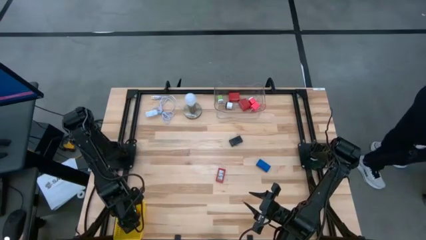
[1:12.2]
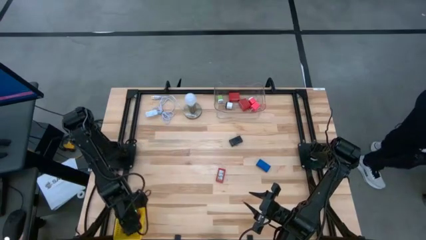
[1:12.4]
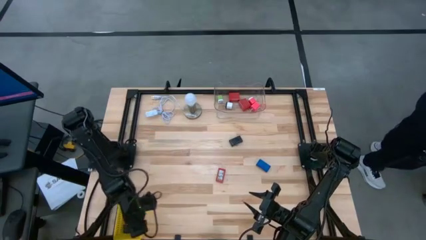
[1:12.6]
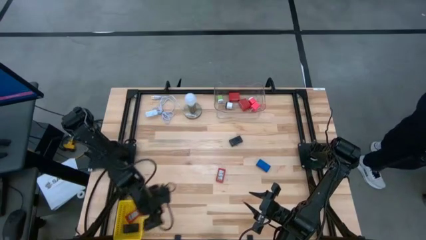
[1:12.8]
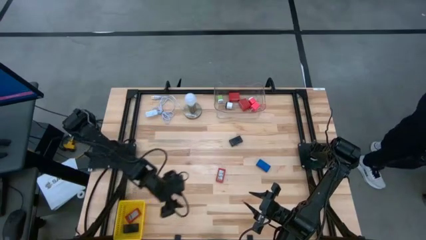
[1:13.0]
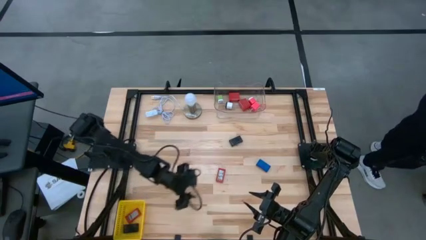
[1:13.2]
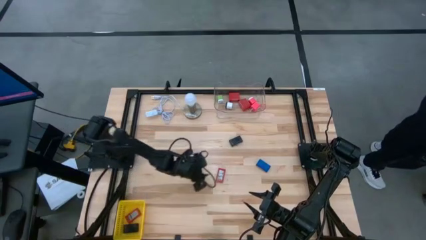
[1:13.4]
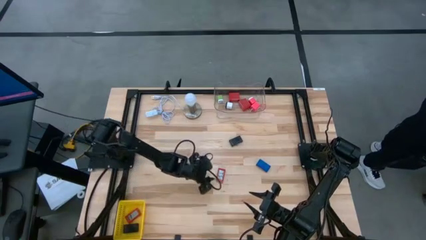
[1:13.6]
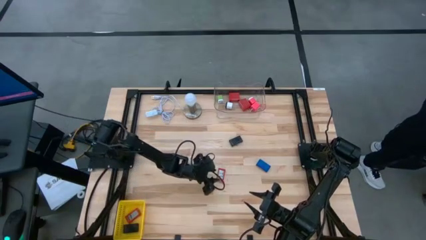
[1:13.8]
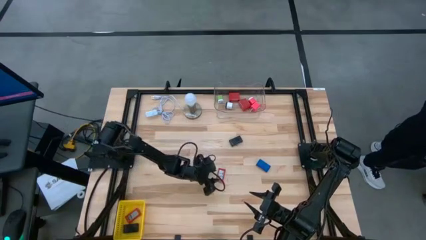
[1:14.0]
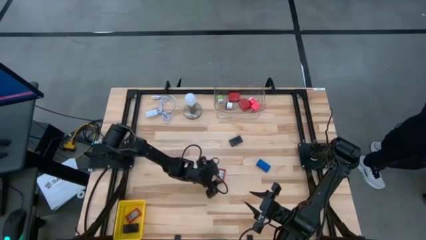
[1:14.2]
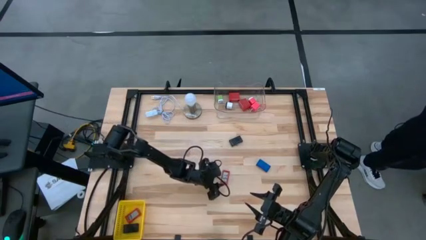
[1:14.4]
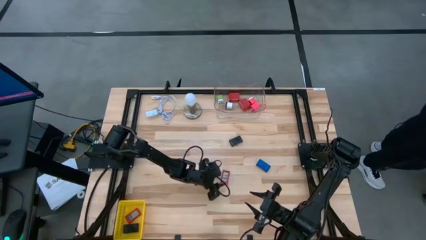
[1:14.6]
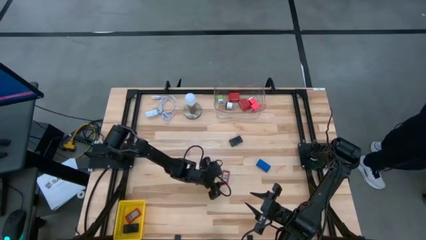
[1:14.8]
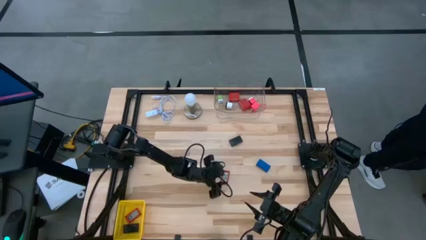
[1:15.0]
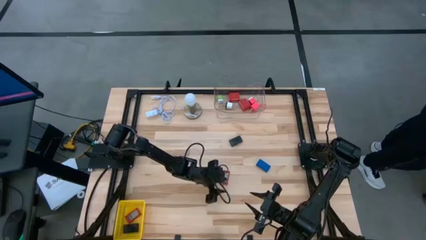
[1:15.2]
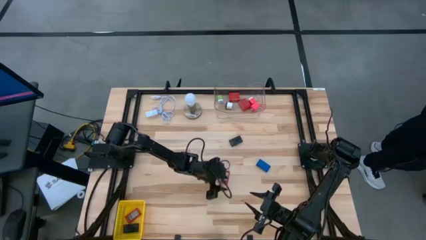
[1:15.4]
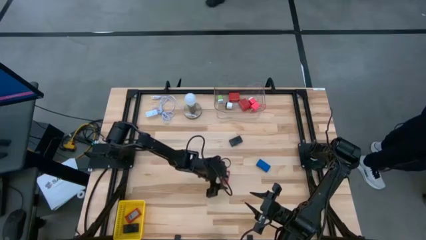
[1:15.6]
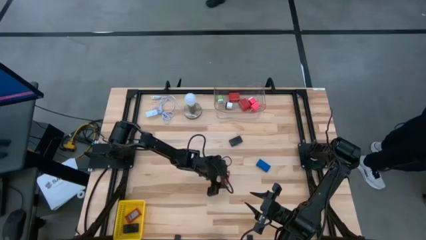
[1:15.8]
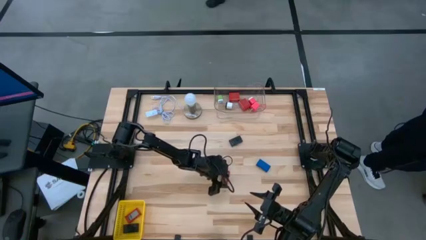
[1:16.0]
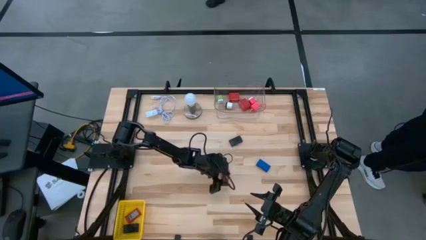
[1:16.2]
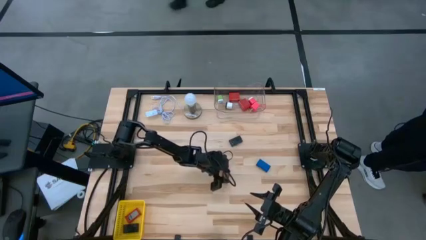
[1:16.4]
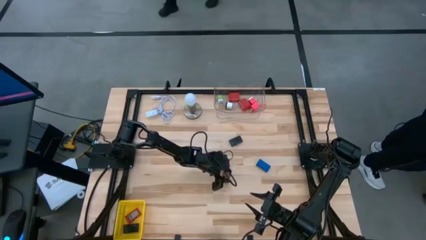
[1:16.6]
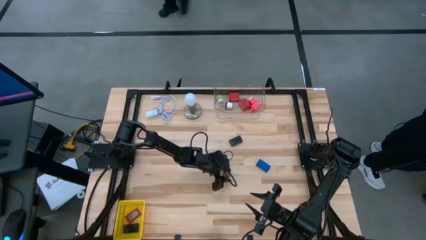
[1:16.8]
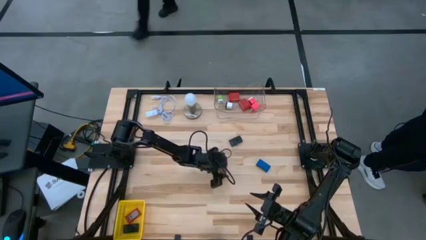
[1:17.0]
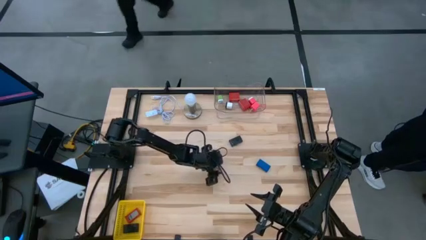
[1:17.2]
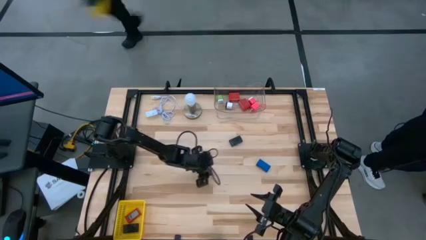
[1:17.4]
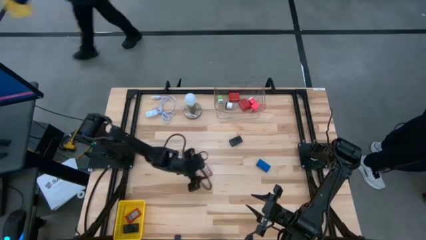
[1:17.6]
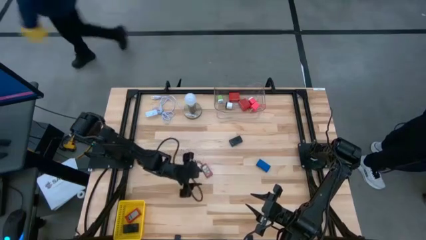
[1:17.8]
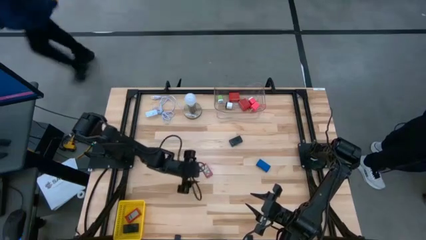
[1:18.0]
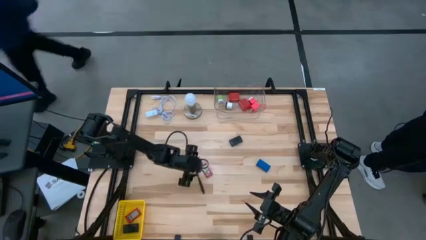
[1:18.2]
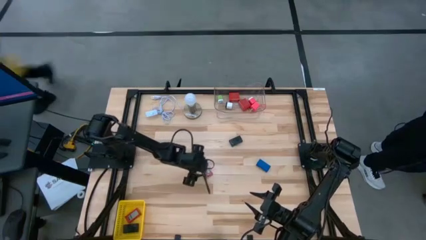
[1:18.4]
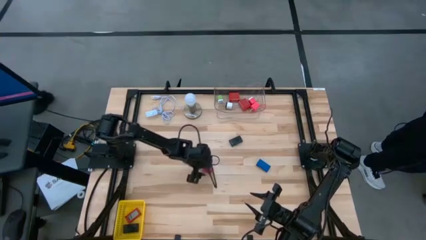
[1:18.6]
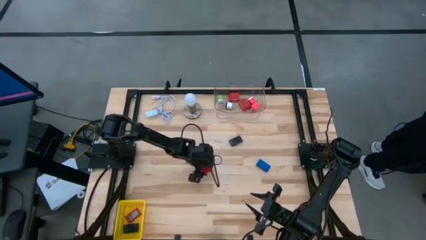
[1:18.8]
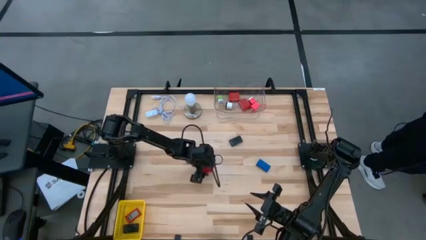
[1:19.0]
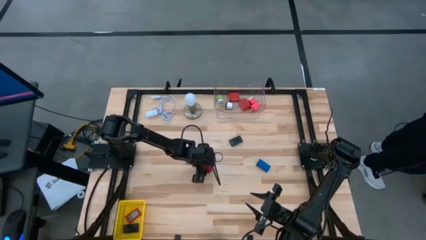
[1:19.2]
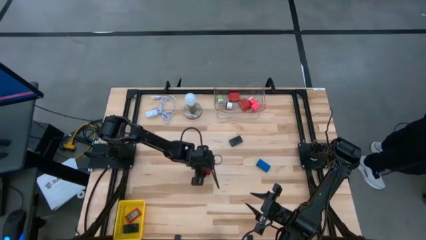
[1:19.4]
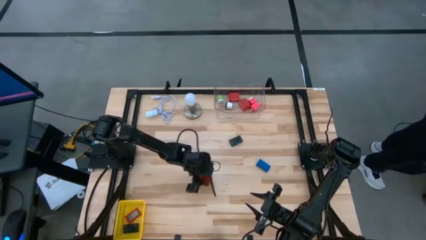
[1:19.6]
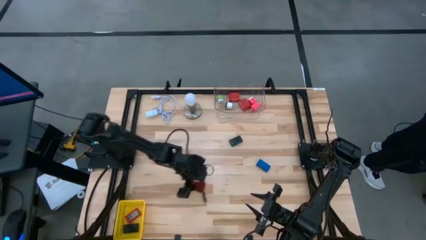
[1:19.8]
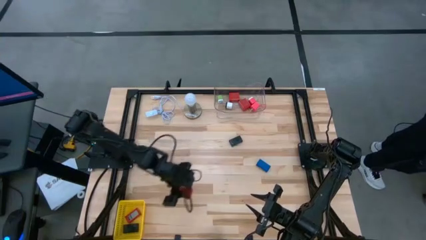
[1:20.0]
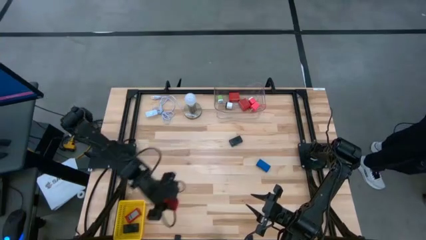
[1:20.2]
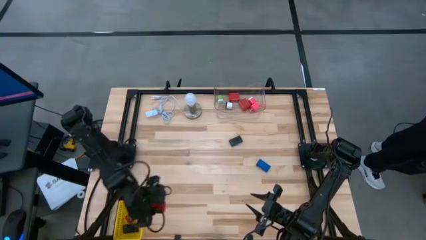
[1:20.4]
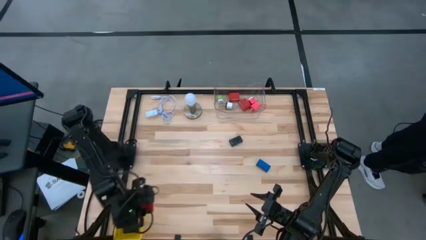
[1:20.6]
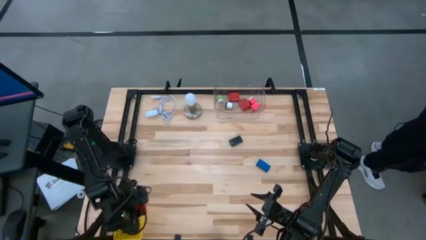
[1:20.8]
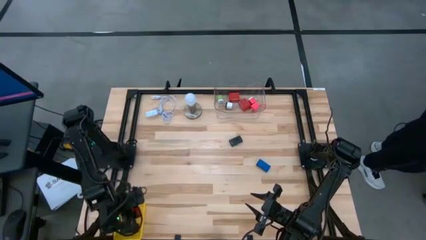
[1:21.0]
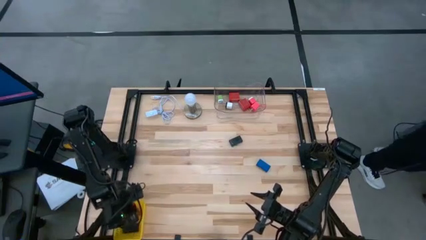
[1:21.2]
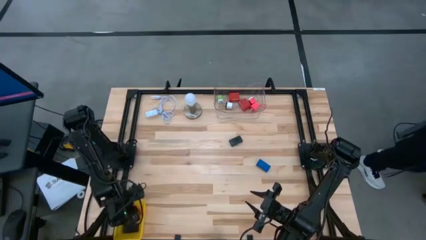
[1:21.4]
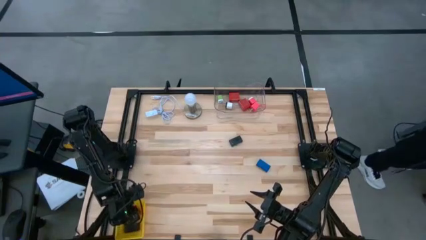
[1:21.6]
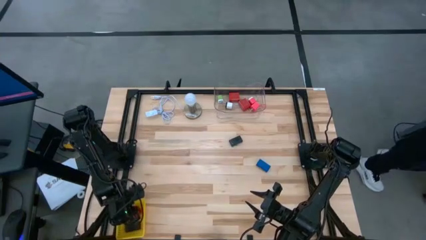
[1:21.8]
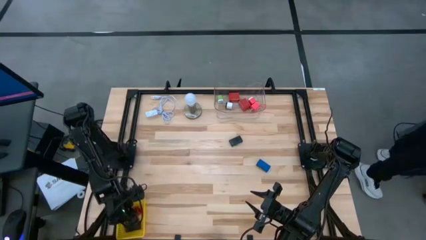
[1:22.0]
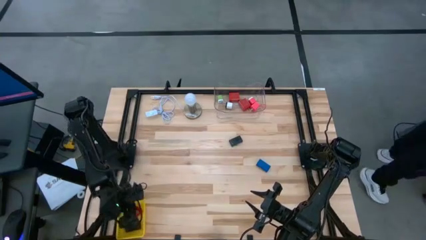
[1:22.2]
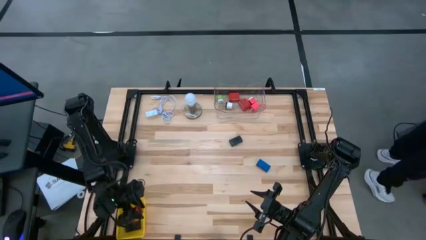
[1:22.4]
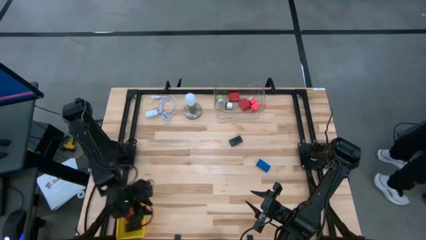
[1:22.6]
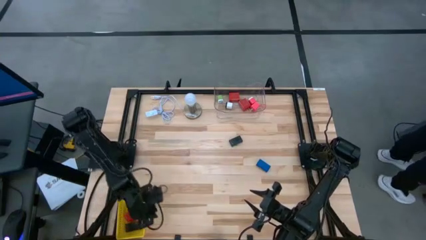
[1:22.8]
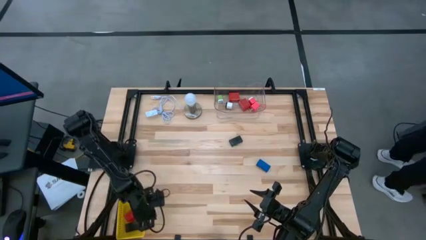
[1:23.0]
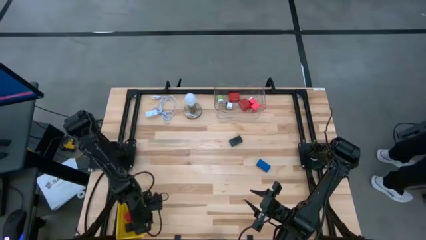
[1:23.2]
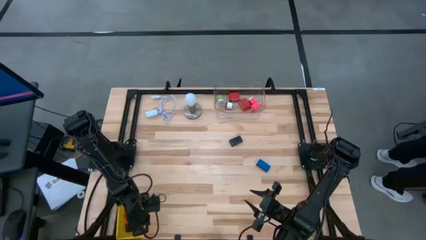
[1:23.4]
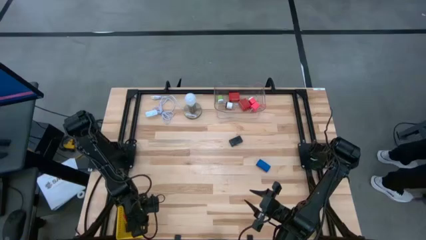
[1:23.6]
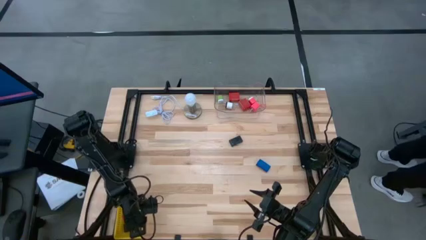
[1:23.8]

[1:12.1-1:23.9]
Task: Pick & Place Office items
Put the red digital clock into the yellow basket
